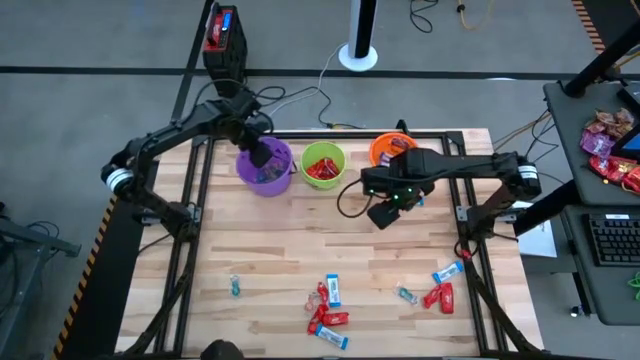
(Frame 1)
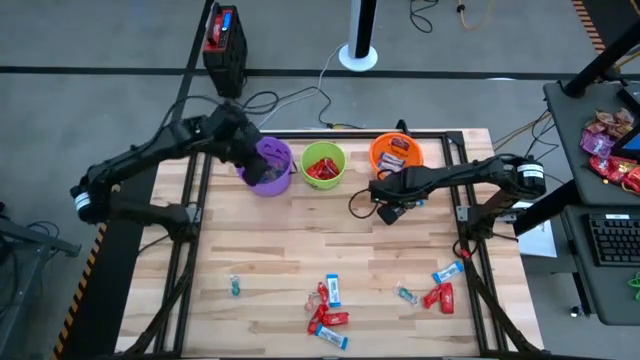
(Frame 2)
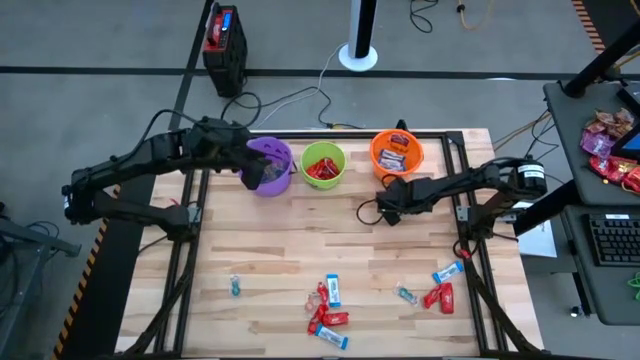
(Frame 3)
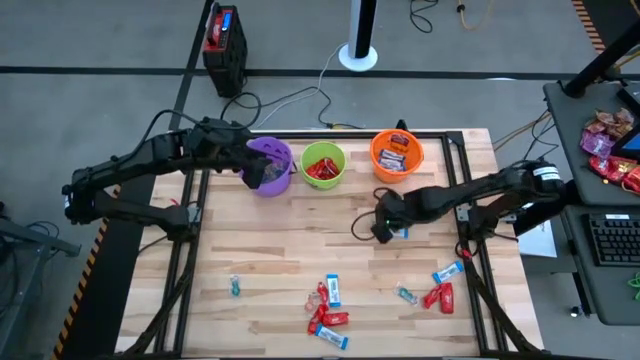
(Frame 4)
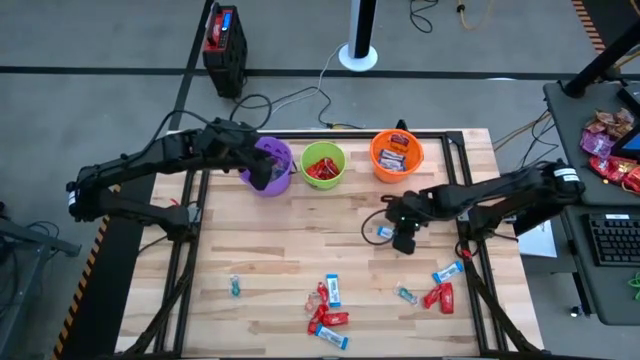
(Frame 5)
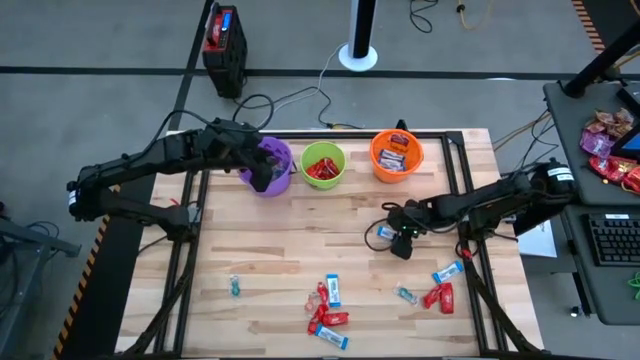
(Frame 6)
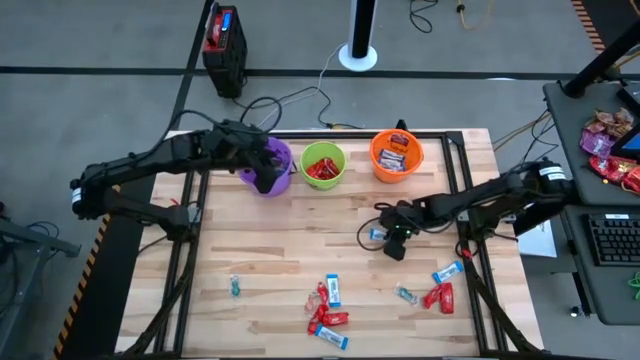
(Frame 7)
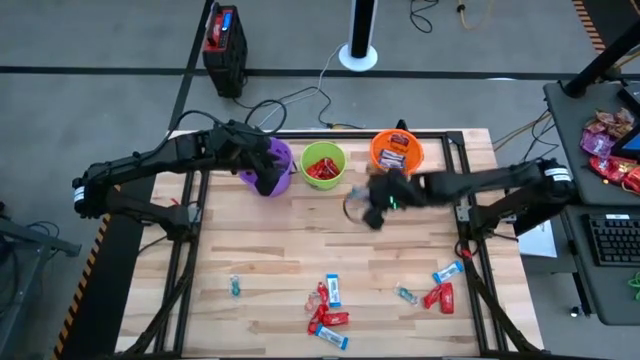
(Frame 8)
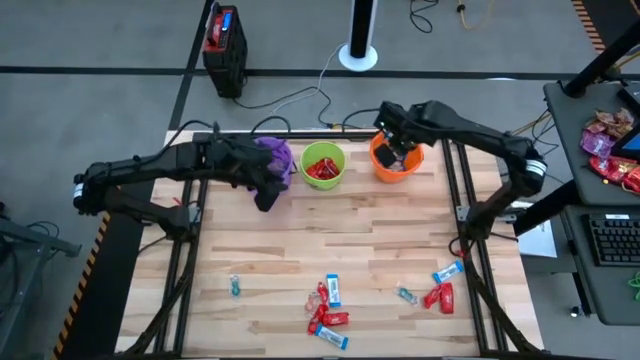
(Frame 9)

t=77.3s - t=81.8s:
Task: Sort candy by brand, put in halloween buckets
Put the white chocolate bar into the orange bucket

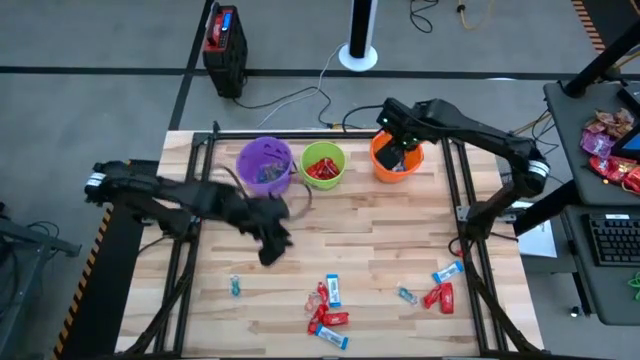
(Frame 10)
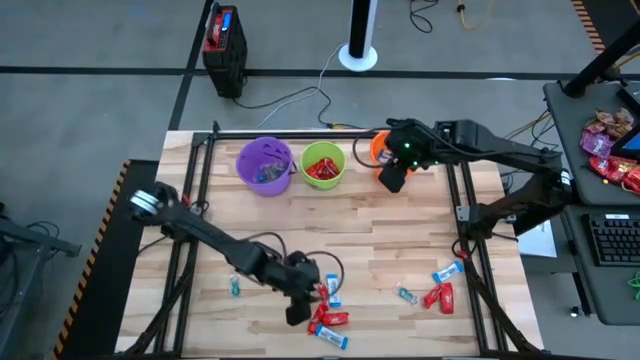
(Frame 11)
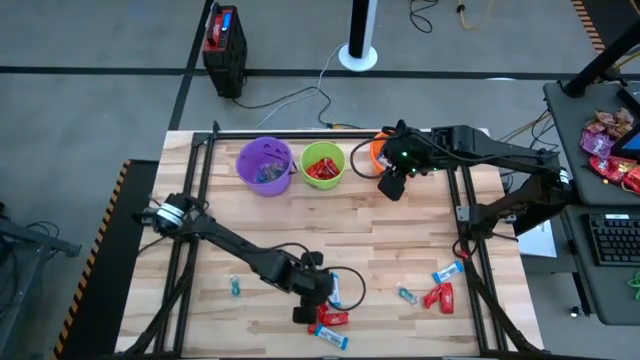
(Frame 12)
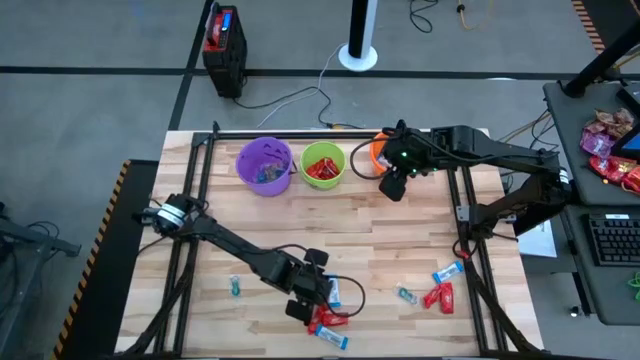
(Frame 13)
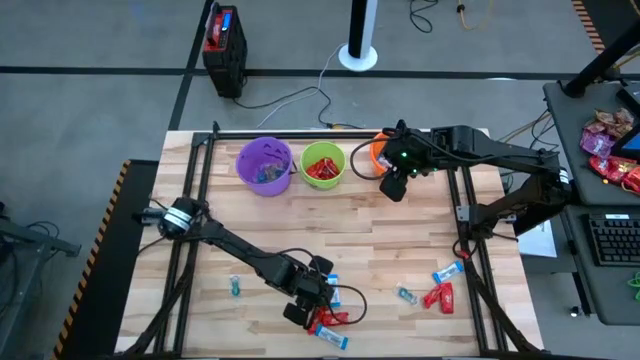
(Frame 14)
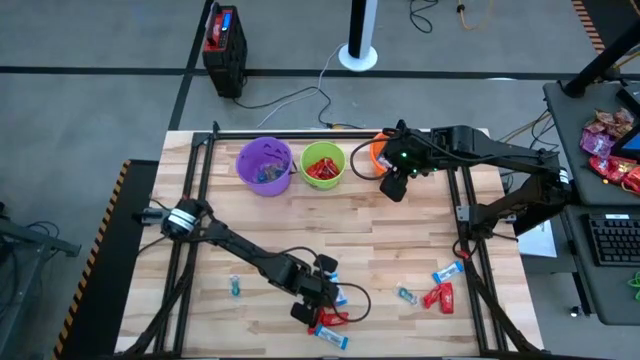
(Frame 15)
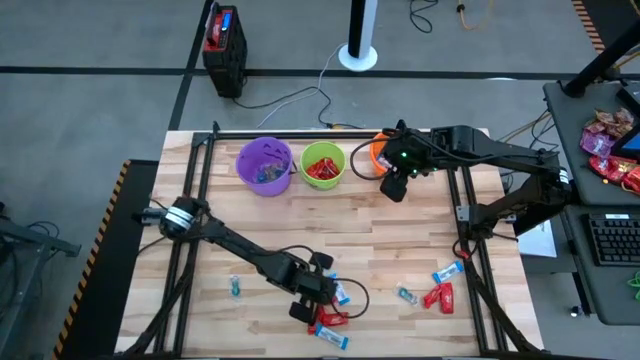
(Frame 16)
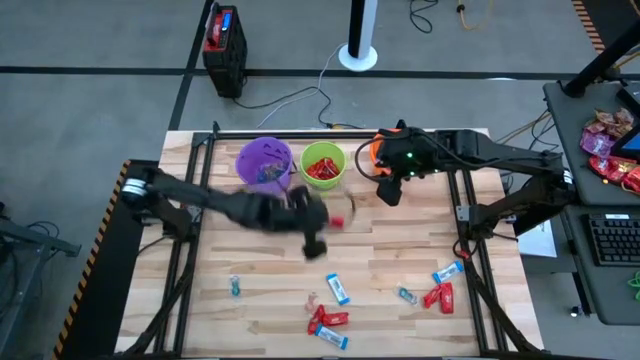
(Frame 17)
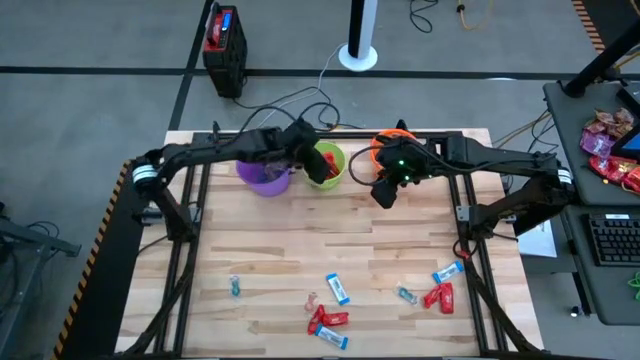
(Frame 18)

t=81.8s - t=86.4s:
Put the red chocolate bar into the green bucket

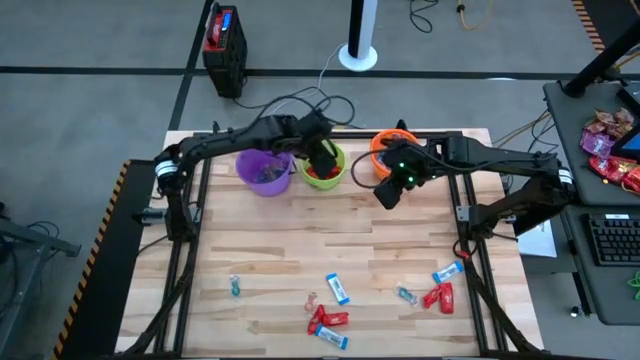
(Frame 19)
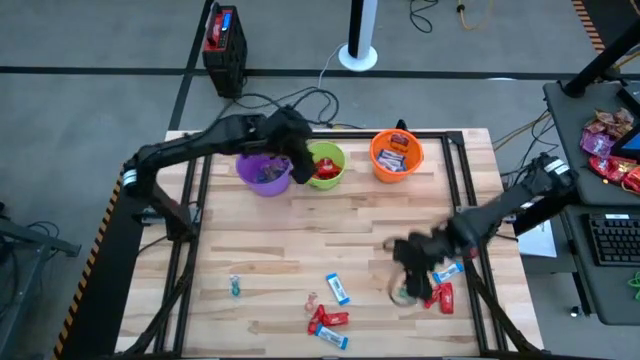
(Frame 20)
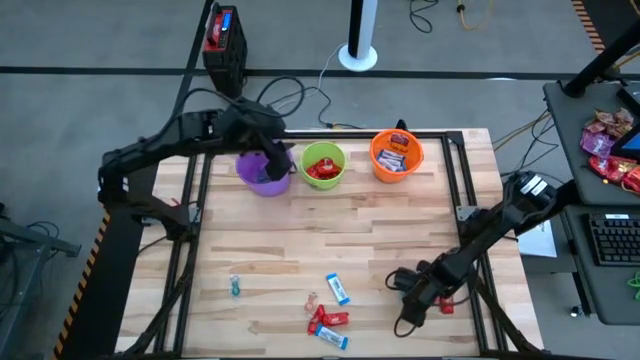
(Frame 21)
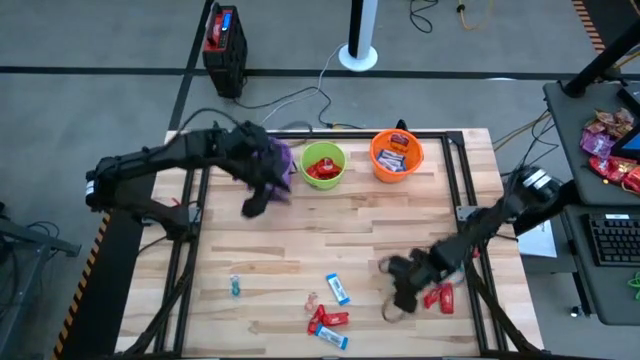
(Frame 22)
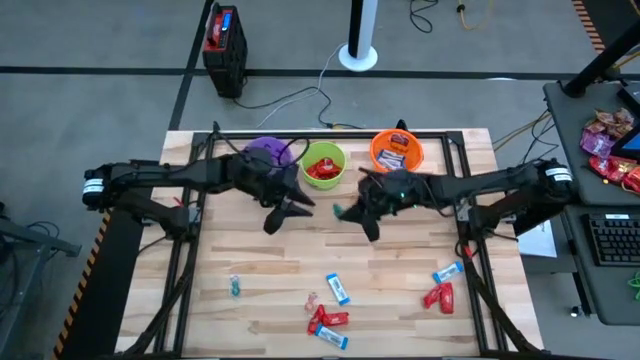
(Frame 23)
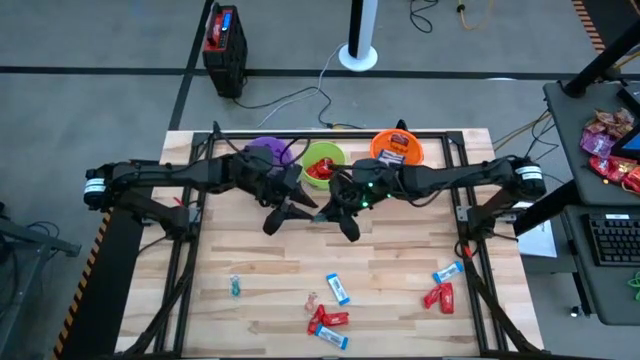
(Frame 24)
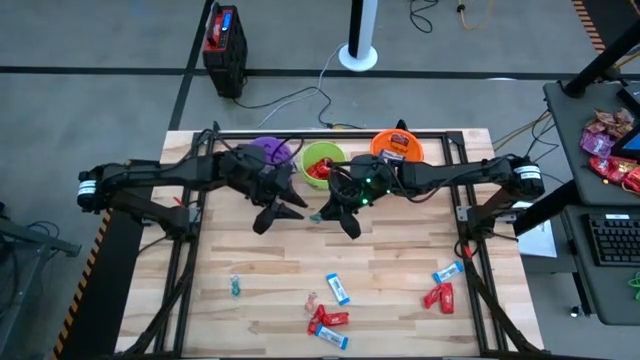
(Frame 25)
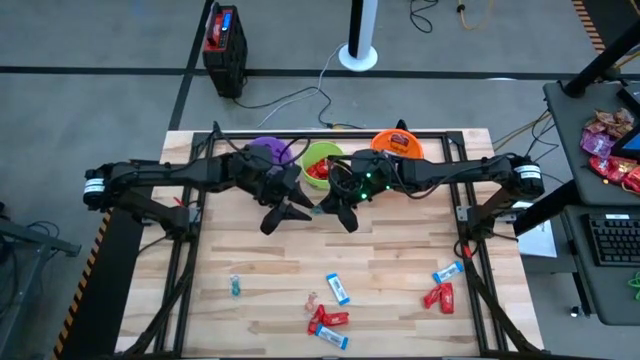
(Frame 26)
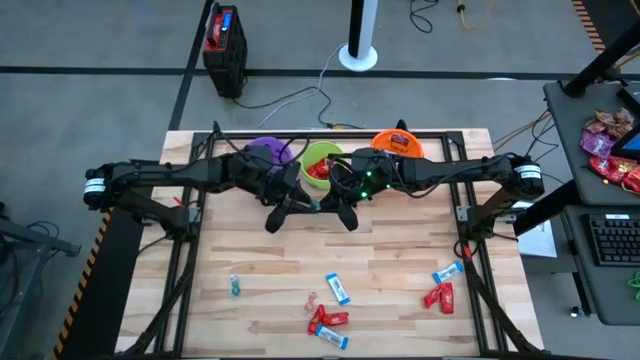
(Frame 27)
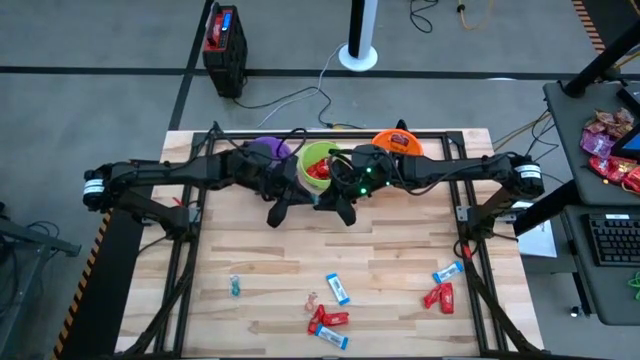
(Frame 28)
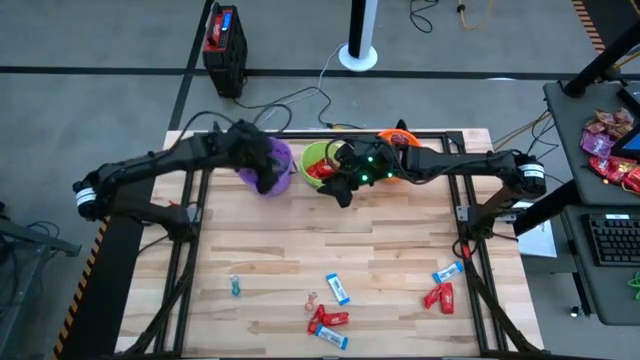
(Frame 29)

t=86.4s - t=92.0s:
Put the blue gummy candy into the purple bucket

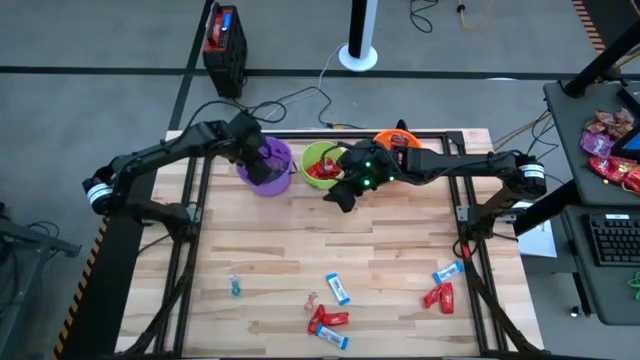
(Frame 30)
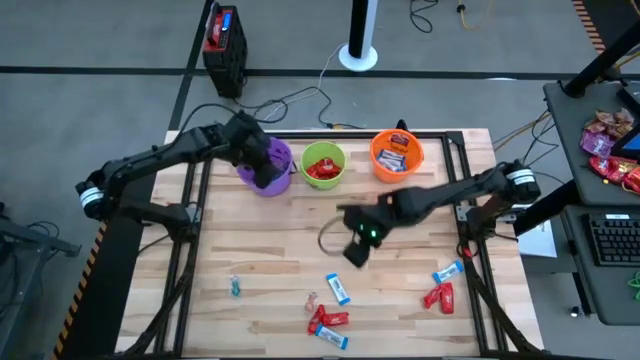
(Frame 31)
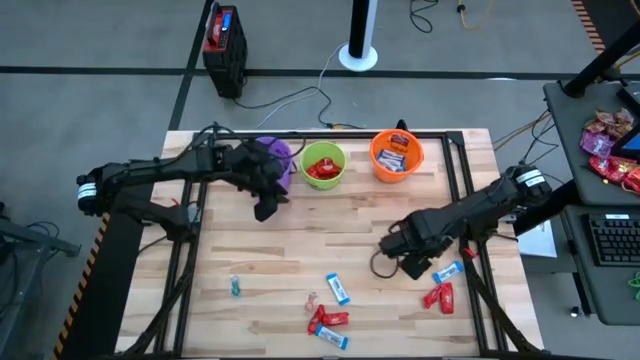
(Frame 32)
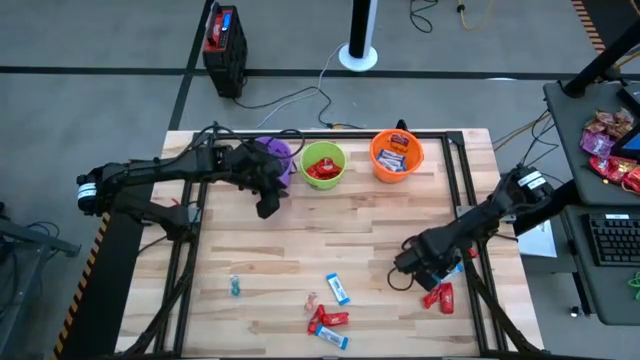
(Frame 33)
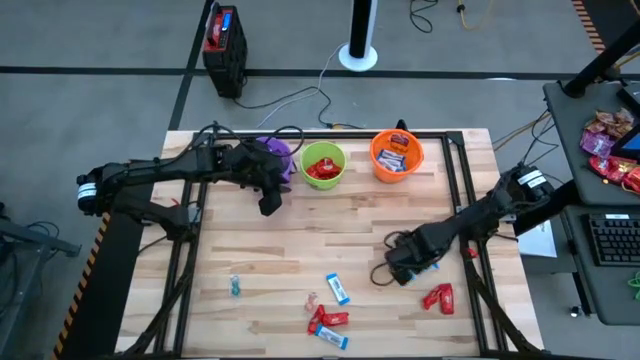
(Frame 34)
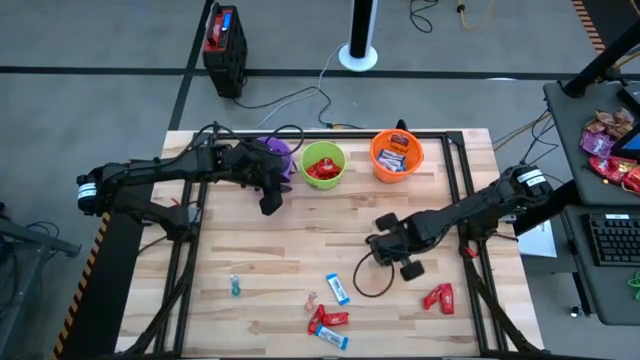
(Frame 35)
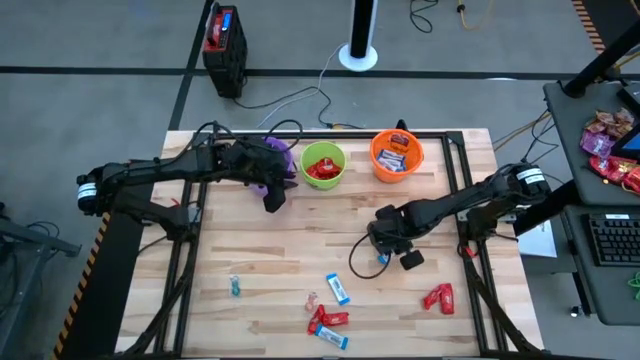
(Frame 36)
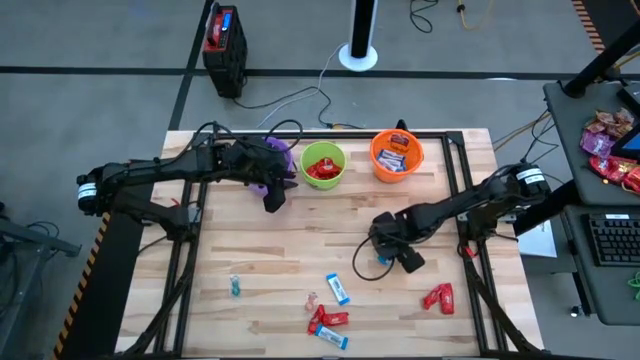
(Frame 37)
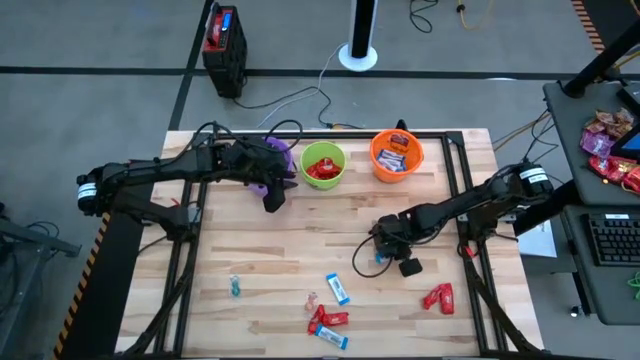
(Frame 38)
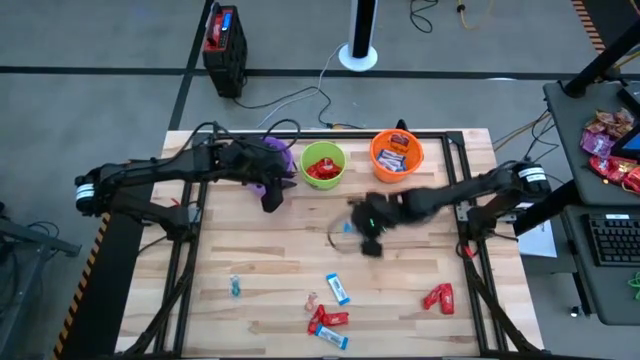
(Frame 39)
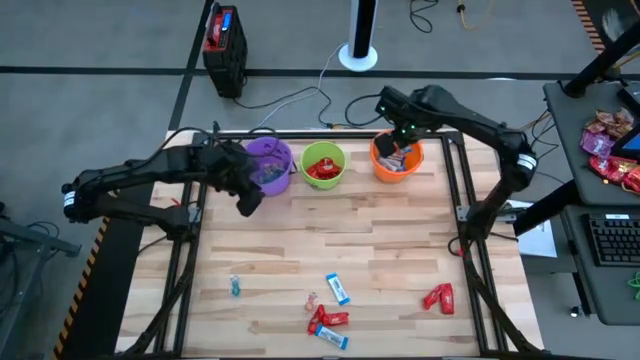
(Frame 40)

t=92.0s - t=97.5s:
Put the white chocolate bar into the orange bucket

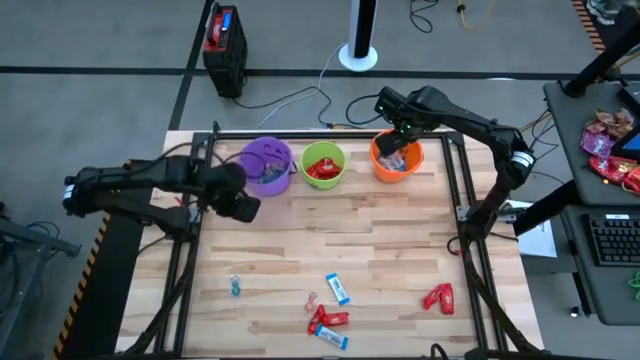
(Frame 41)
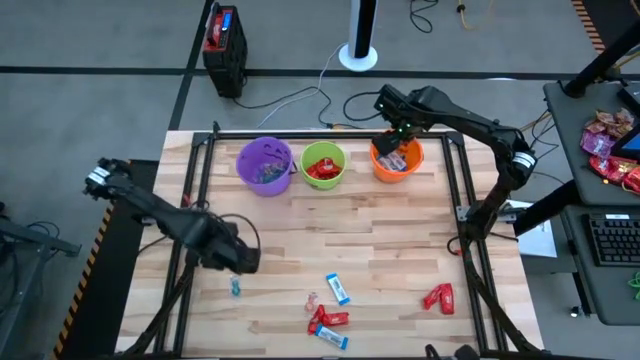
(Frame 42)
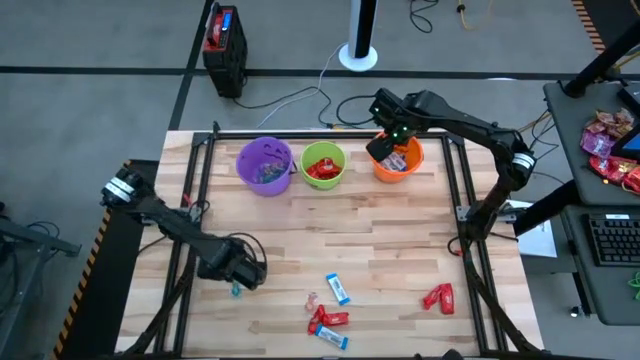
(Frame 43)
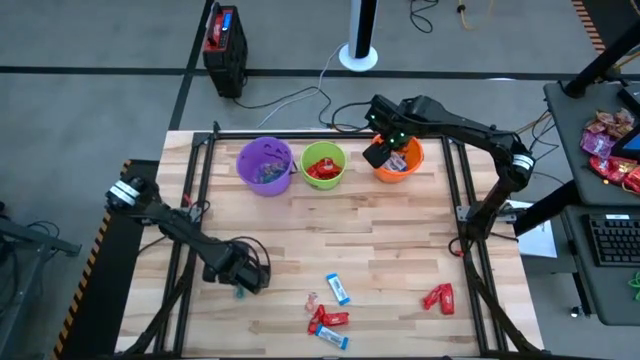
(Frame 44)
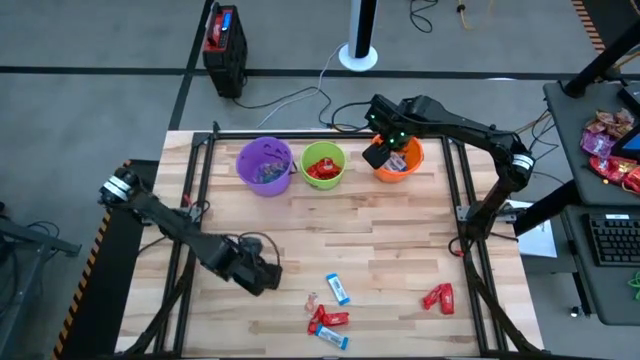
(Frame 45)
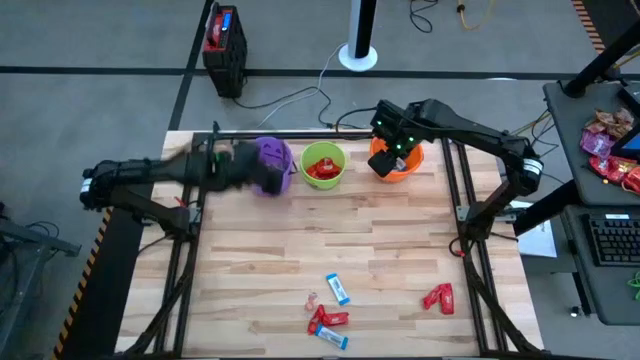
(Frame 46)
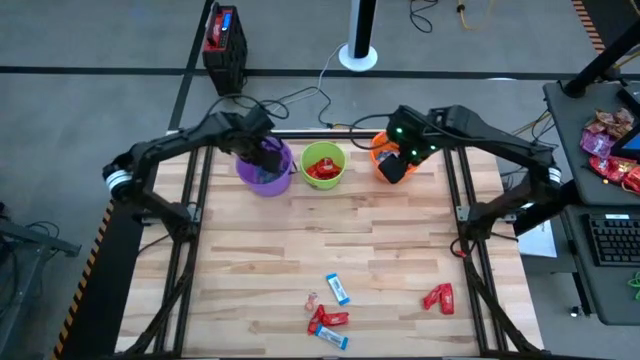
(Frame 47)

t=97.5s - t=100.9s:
Put the blue gummy candy into the purple bucket
